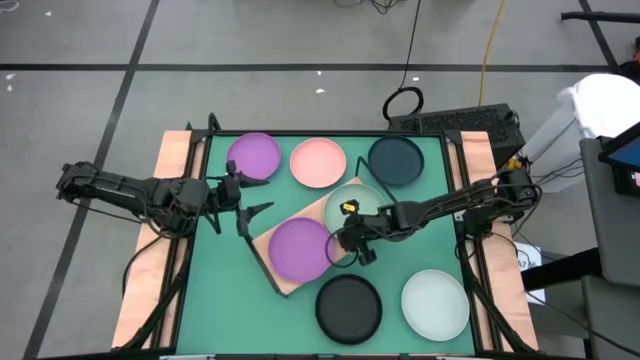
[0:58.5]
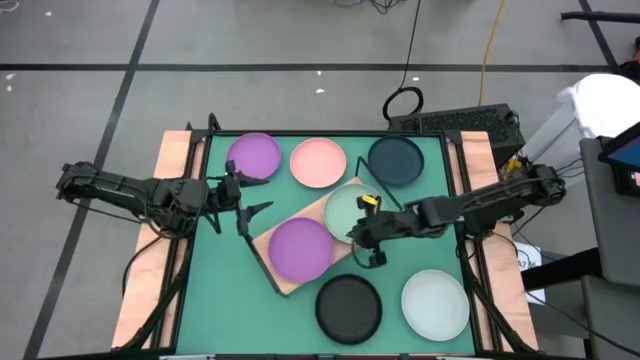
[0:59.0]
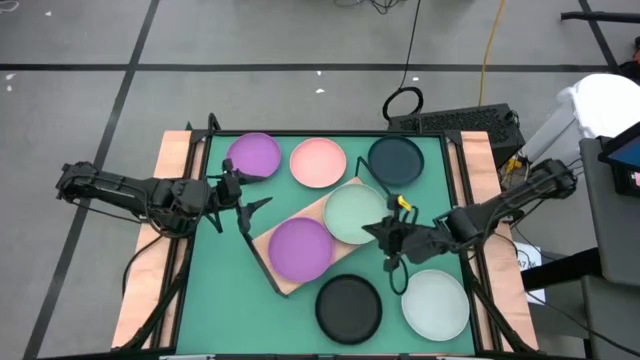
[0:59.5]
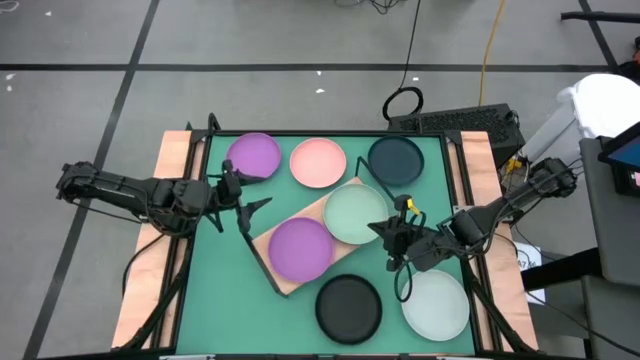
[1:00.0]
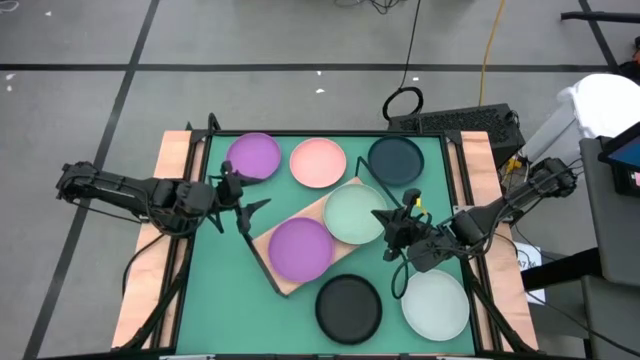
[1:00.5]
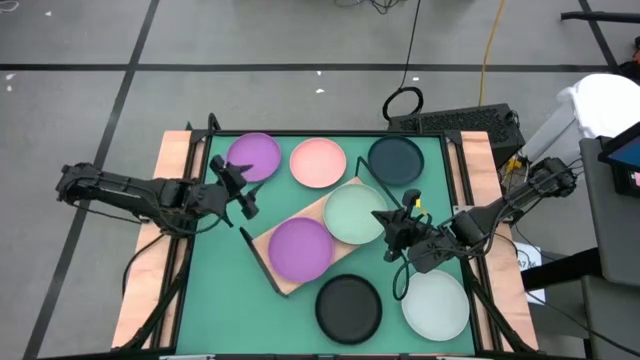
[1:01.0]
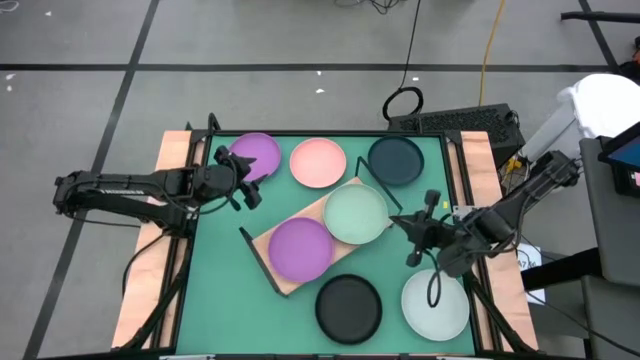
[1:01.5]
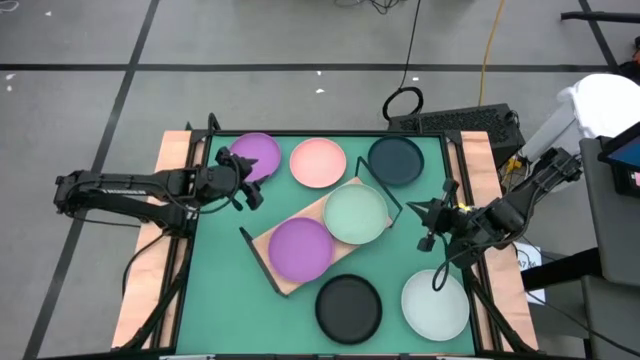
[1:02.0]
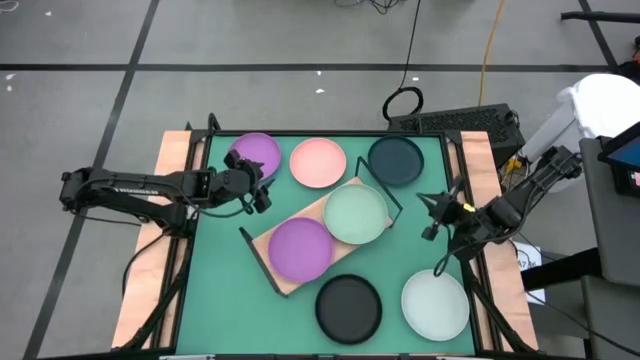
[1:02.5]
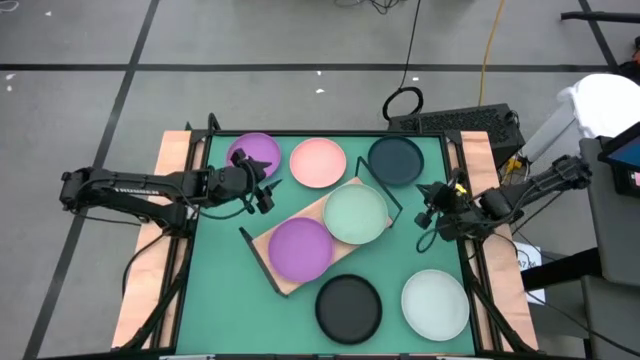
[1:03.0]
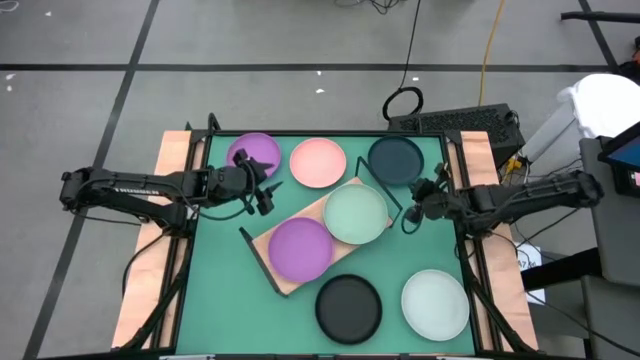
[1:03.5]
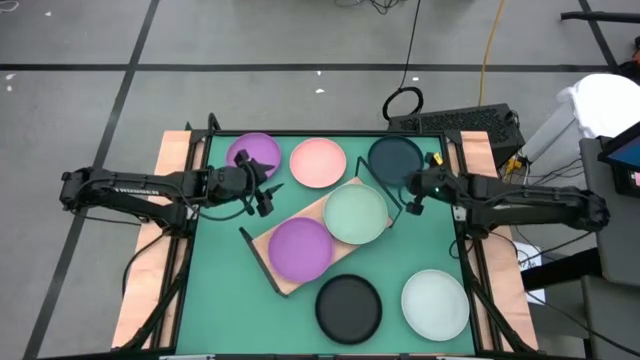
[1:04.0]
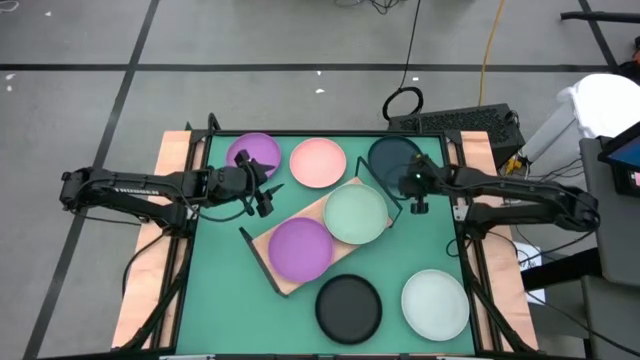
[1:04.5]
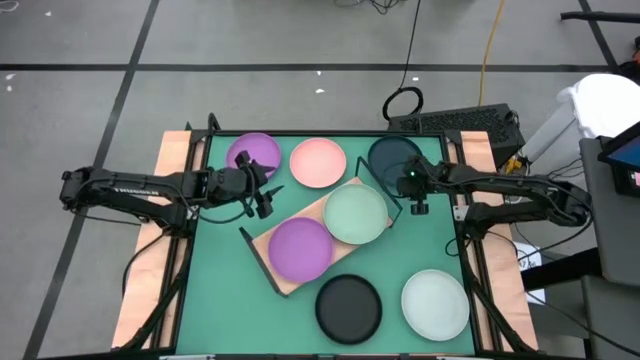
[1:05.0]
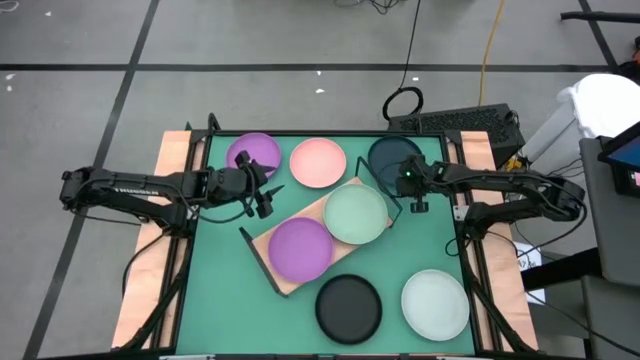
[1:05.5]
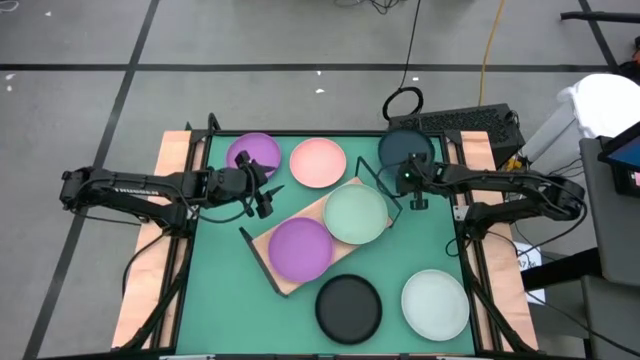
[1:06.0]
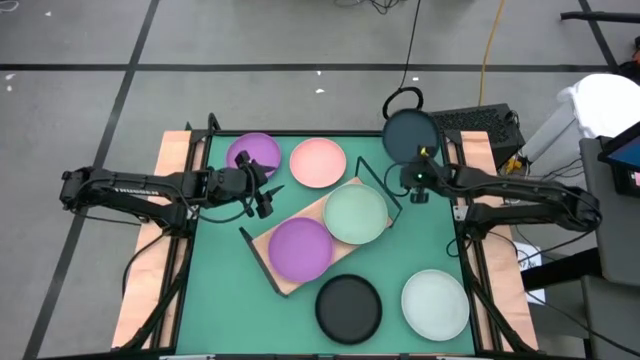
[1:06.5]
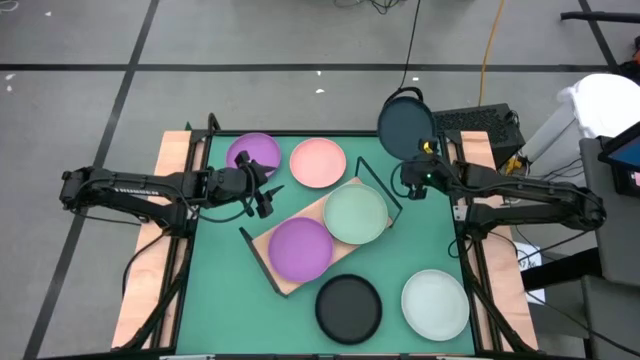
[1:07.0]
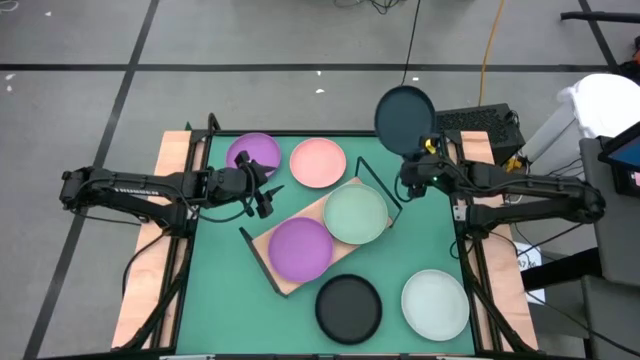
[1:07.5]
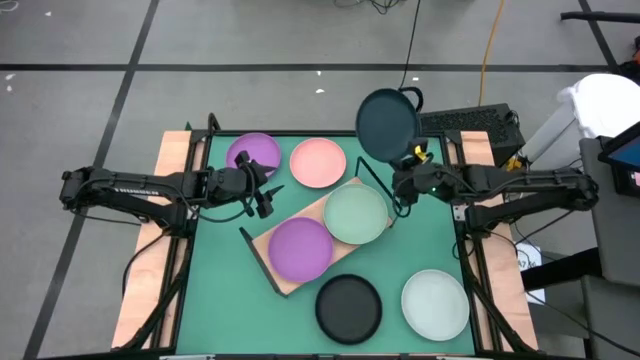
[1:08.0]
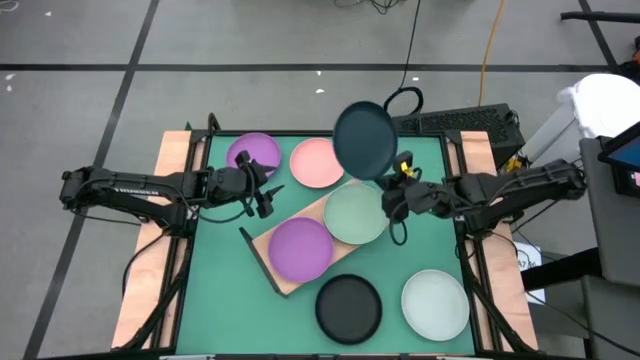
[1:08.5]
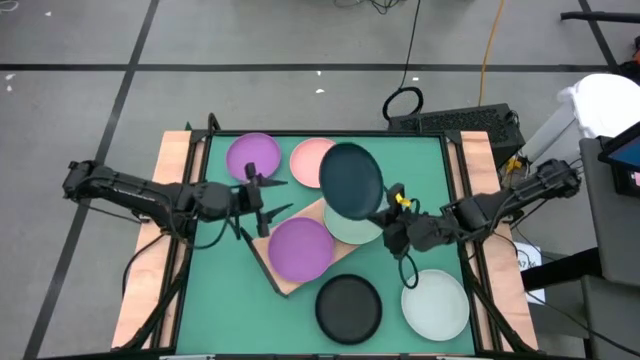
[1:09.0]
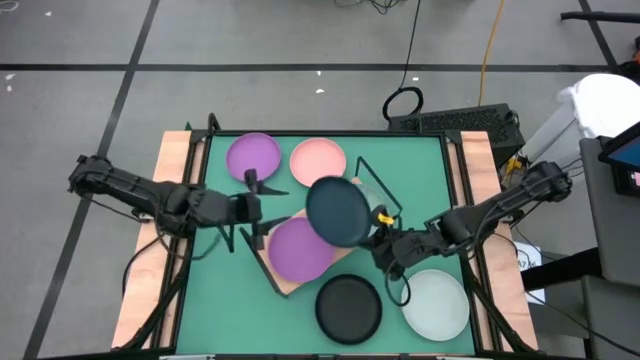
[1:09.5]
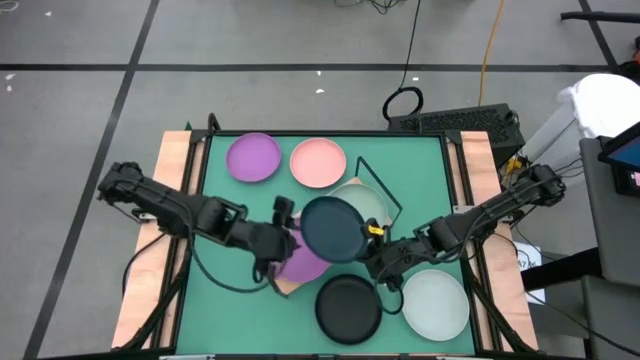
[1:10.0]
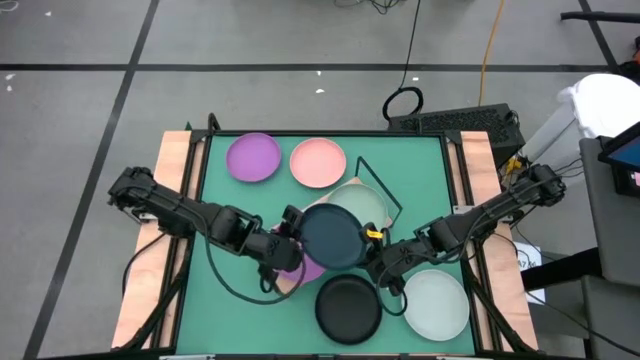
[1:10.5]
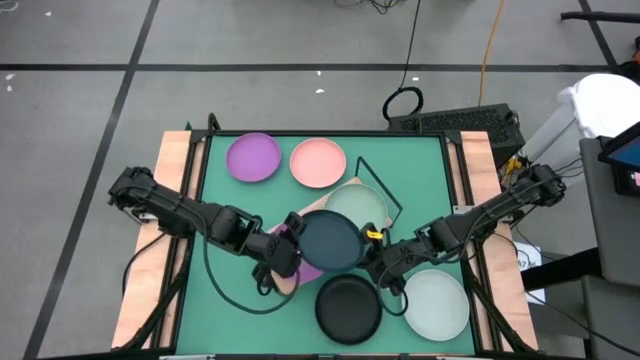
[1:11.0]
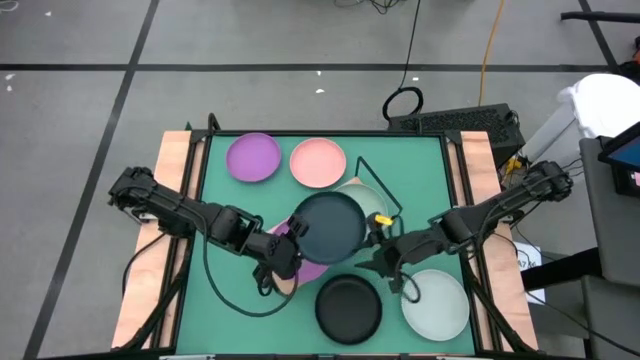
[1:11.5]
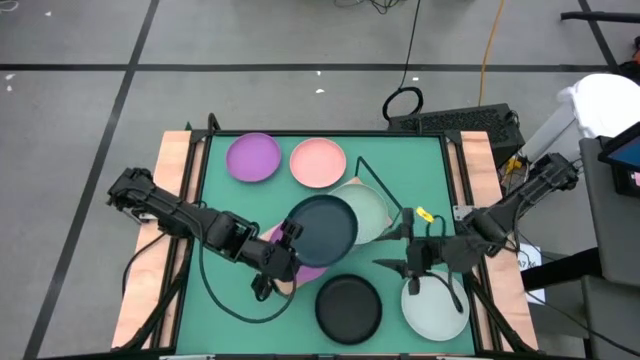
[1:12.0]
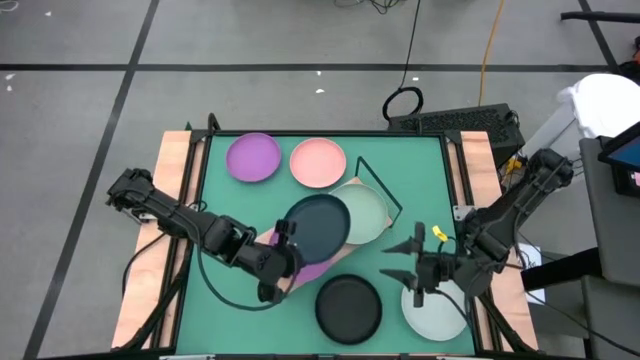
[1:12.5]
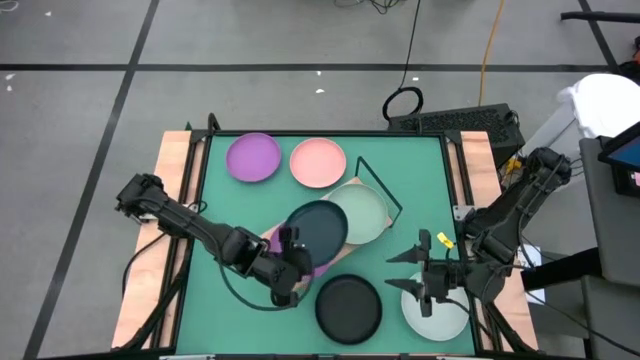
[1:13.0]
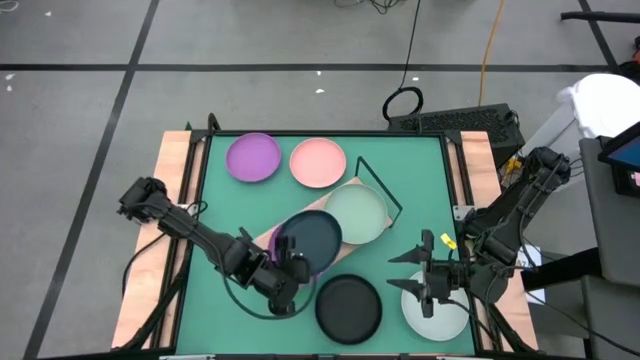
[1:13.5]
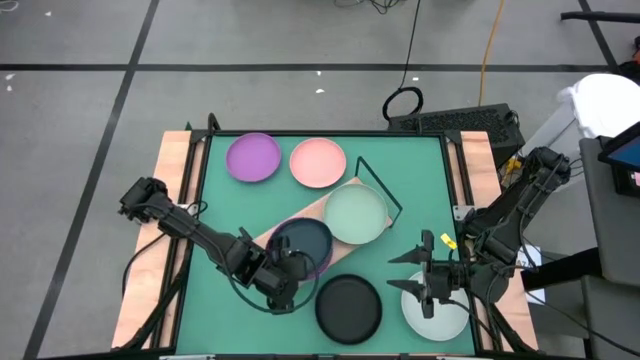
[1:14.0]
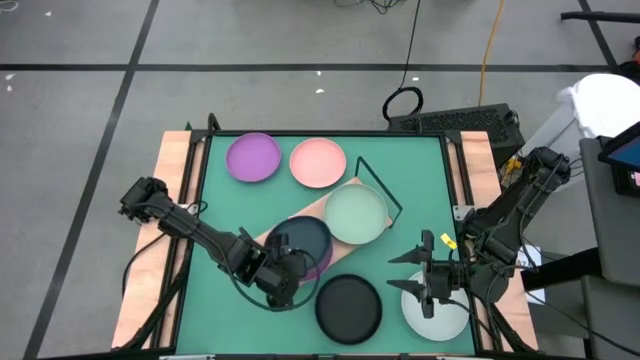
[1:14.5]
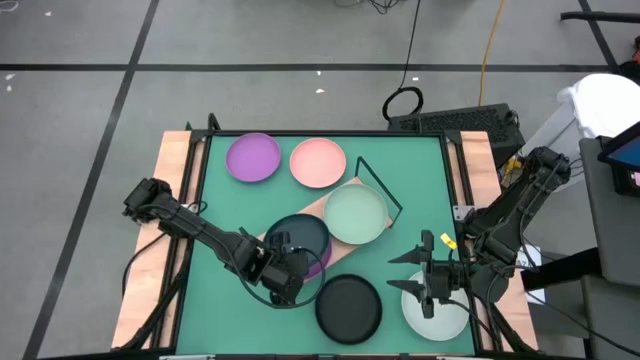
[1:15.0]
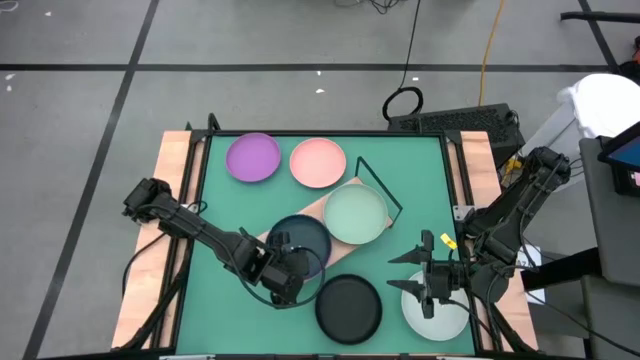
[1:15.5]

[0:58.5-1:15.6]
Task: Place and stack plates onto a shelf
Stack the blue plate on top of the violet plate on the shelf
